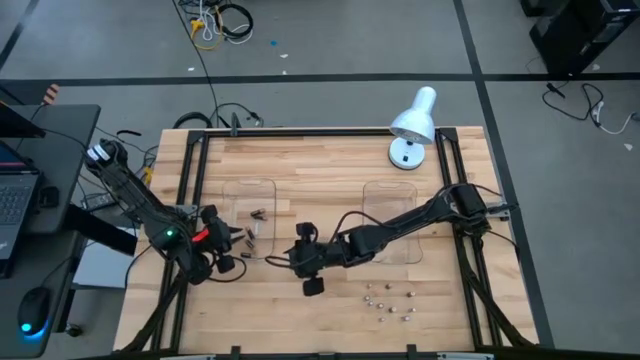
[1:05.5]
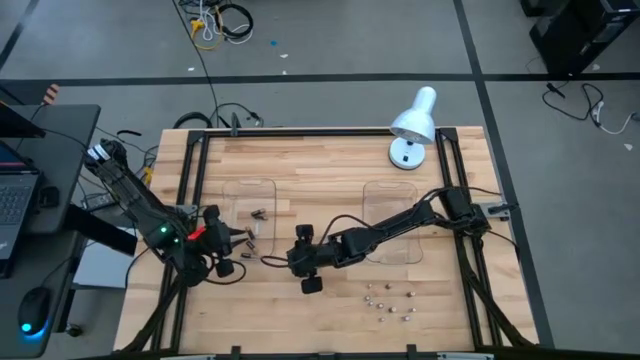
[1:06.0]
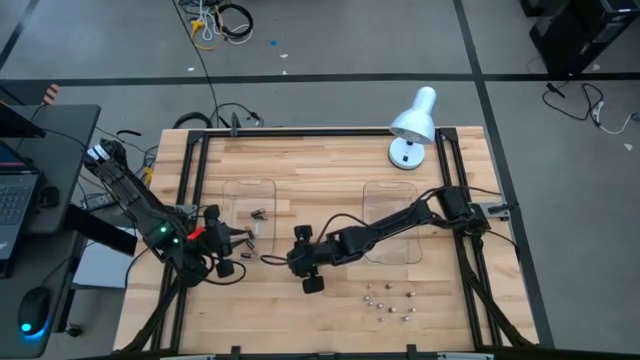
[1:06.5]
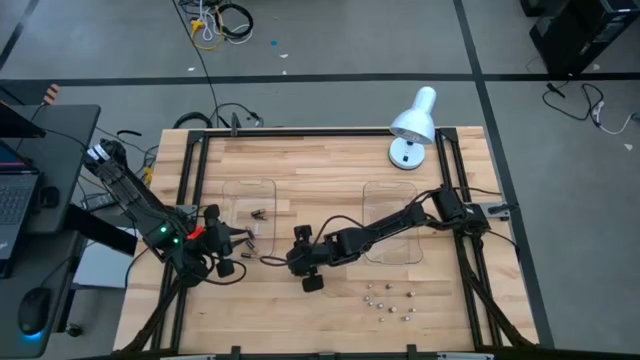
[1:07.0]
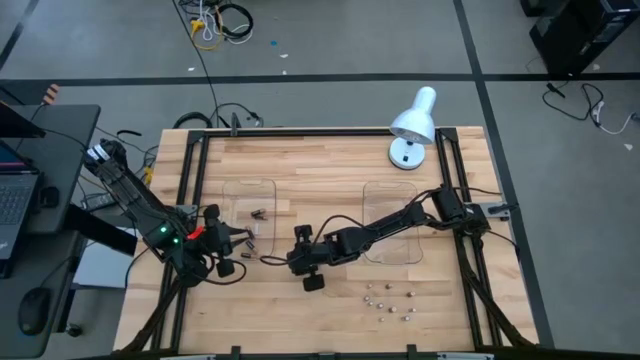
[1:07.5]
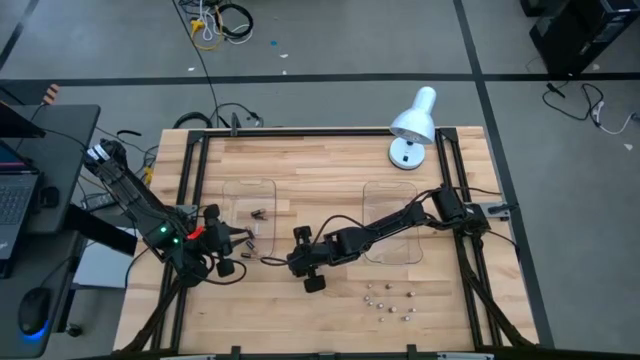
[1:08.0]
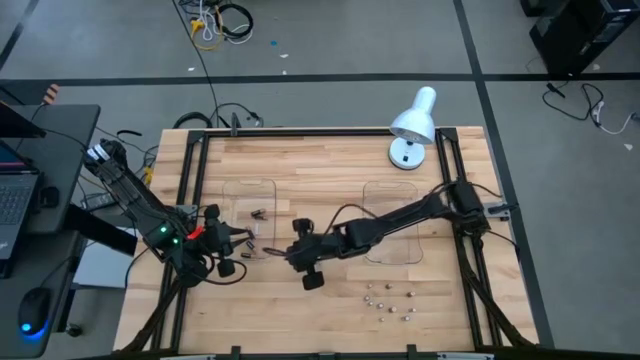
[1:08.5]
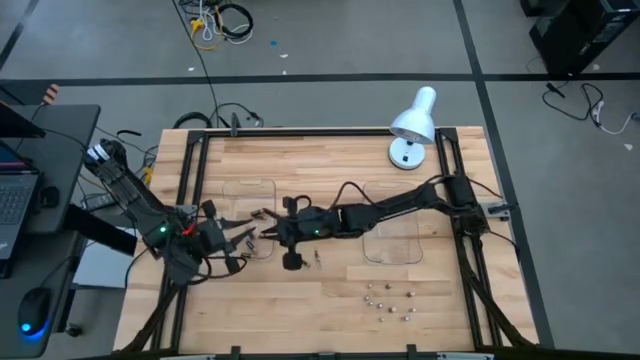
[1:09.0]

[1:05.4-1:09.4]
Task: Sort batteries
Put the black battery into the left transparent bin

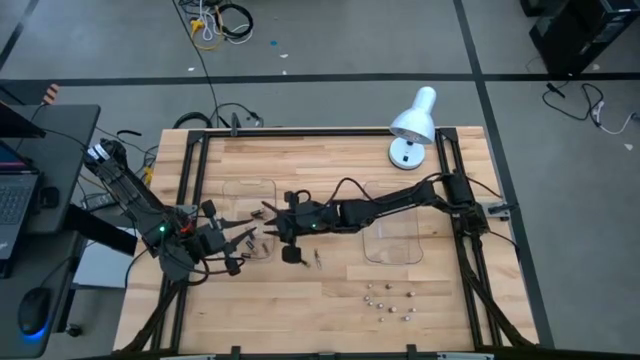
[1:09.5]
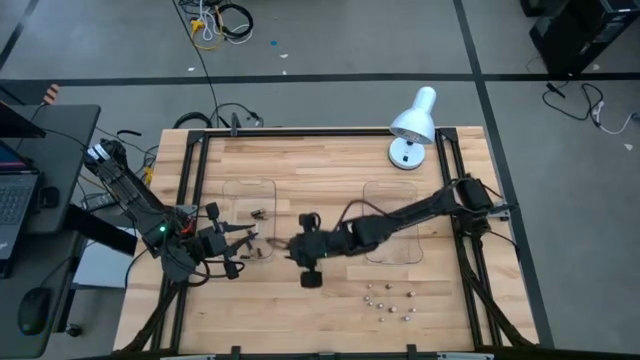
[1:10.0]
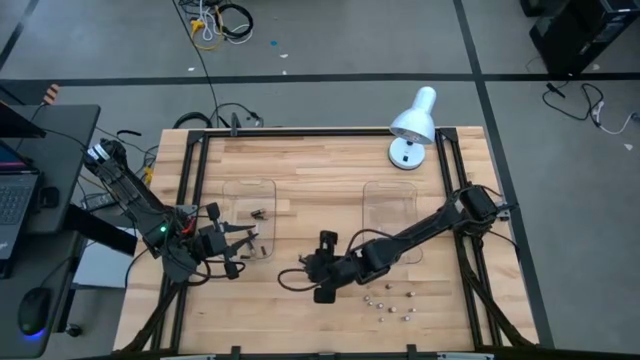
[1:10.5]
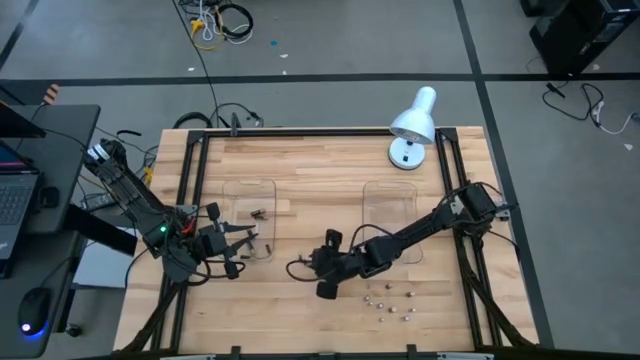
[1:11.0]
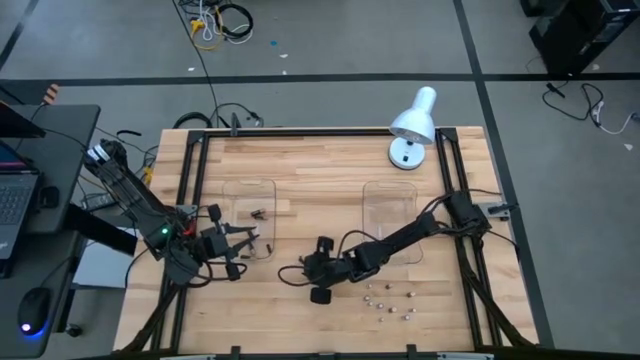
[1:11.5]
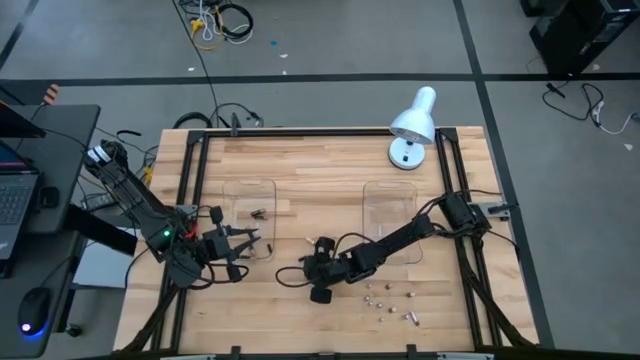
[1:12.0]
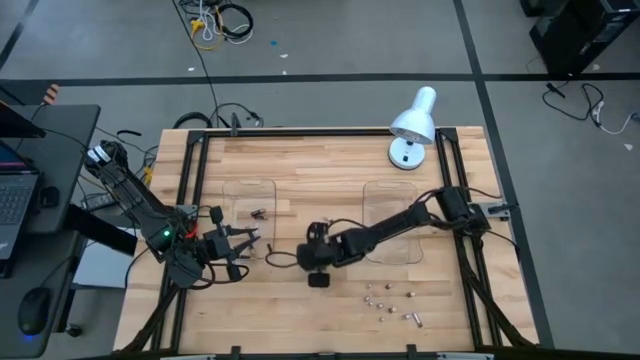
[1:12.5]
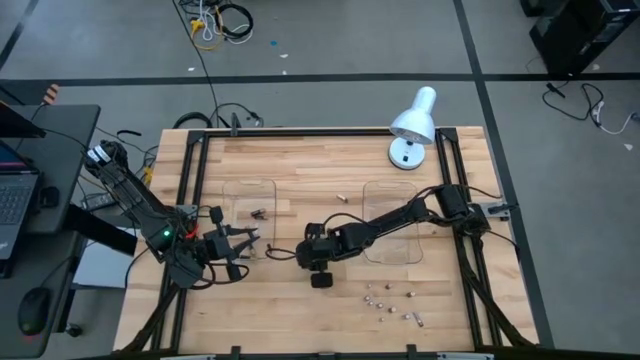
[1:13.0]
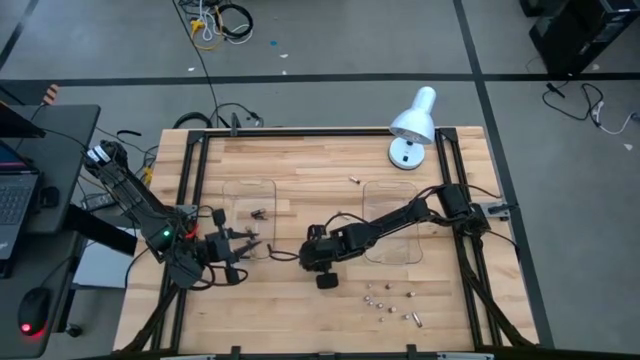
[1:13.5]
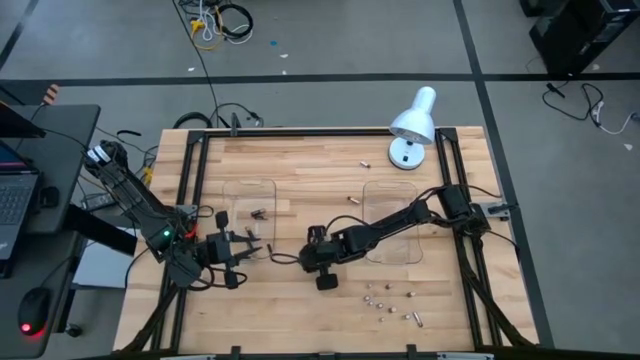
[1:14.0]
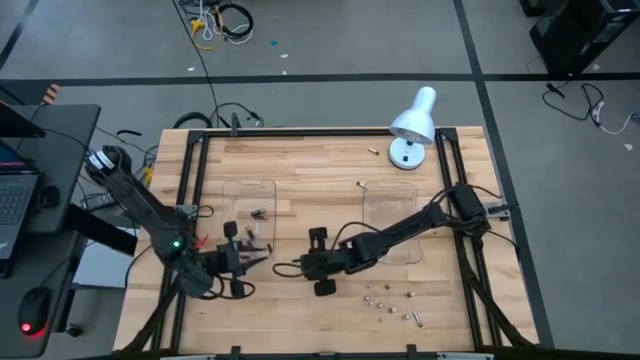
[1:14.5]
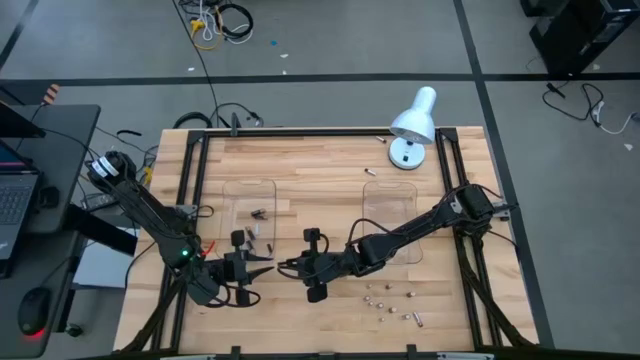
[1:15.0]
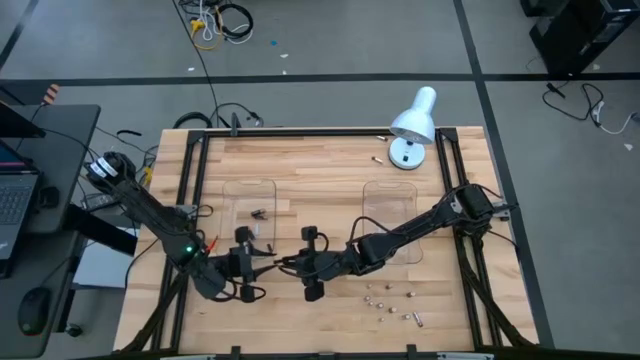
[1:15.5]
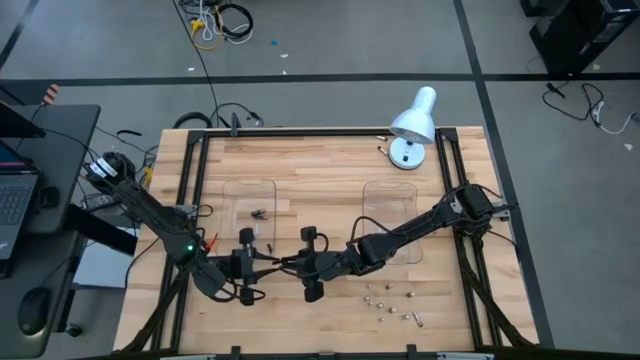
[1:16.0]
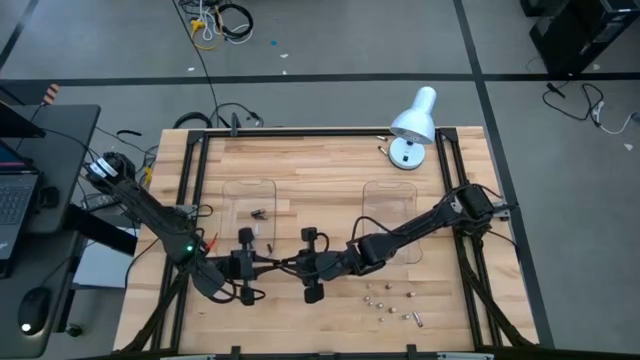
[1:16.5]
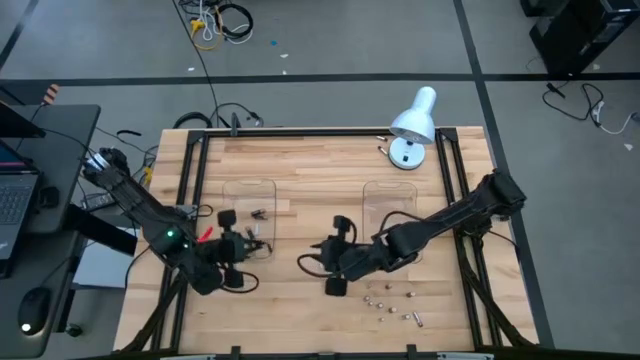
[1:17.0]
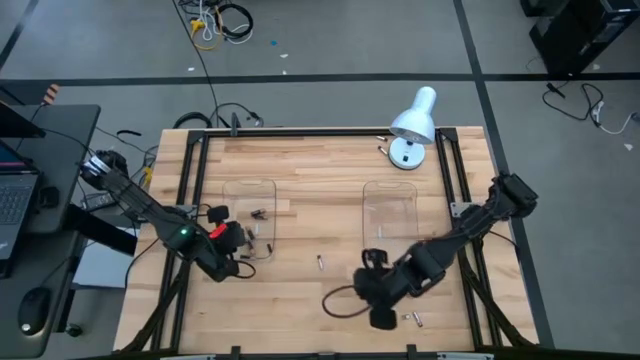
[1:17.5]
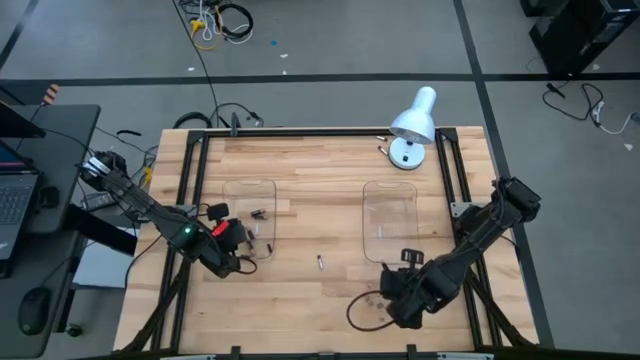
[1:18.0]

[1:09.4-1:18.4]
Put the black battery into the left transparent bin

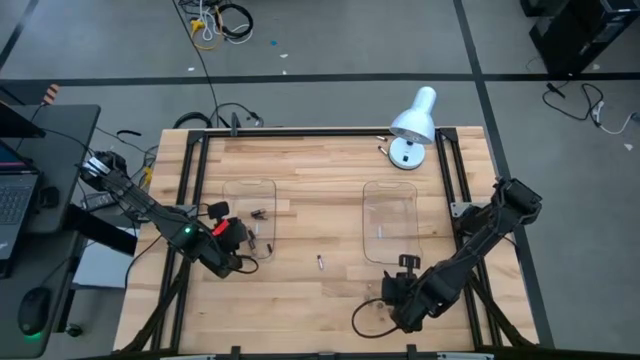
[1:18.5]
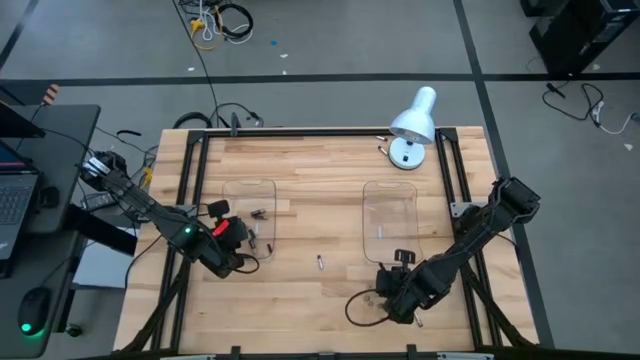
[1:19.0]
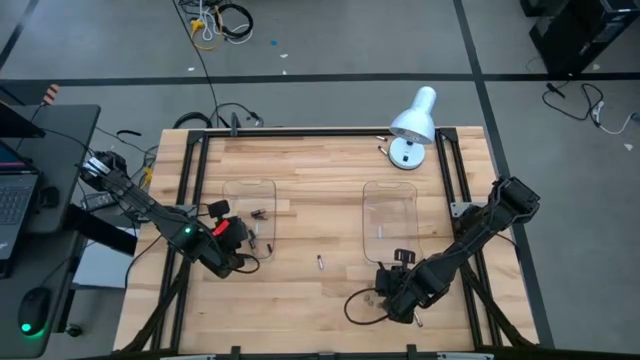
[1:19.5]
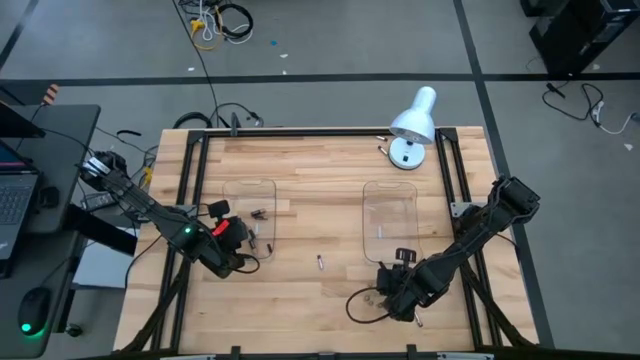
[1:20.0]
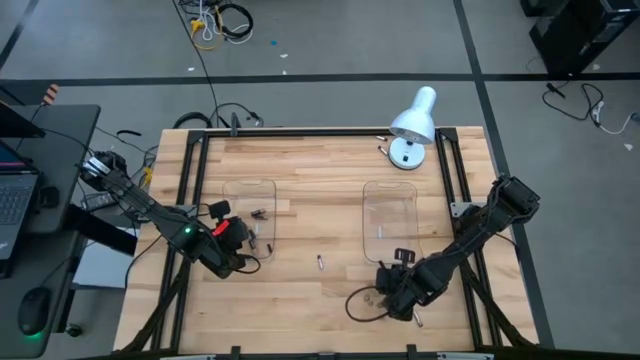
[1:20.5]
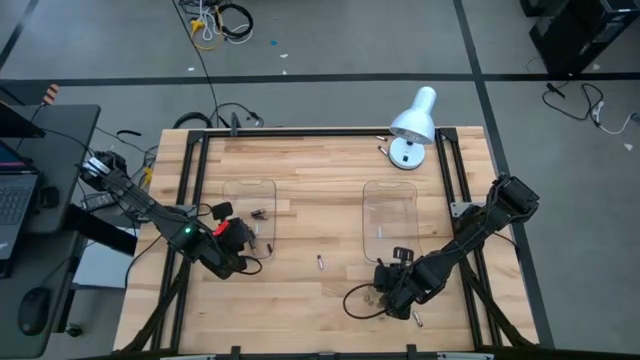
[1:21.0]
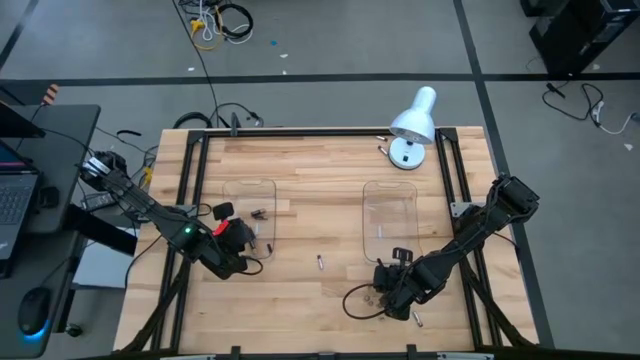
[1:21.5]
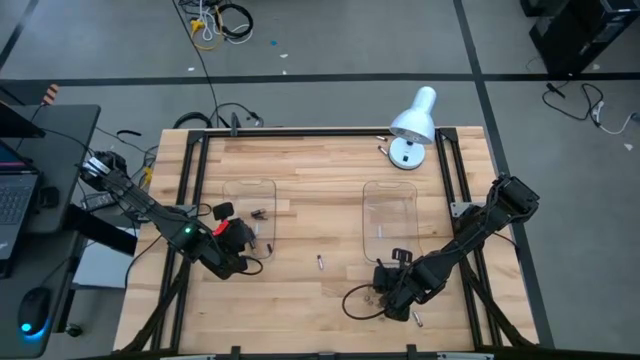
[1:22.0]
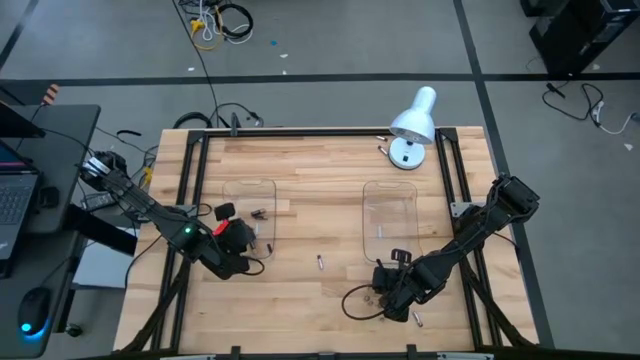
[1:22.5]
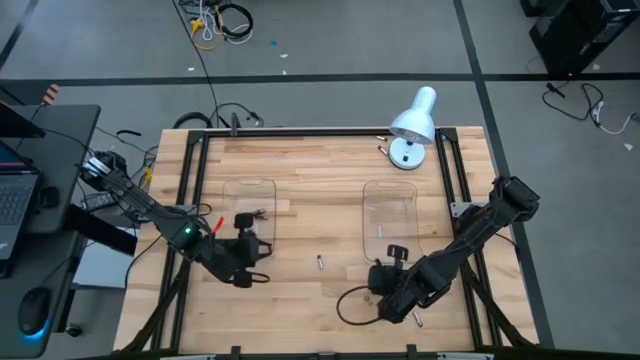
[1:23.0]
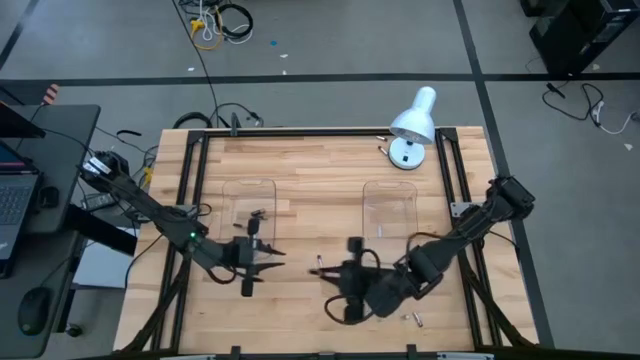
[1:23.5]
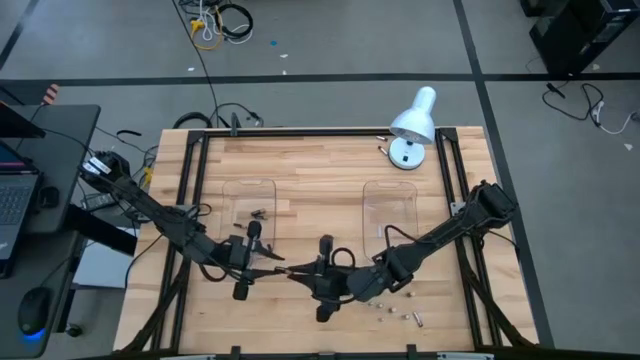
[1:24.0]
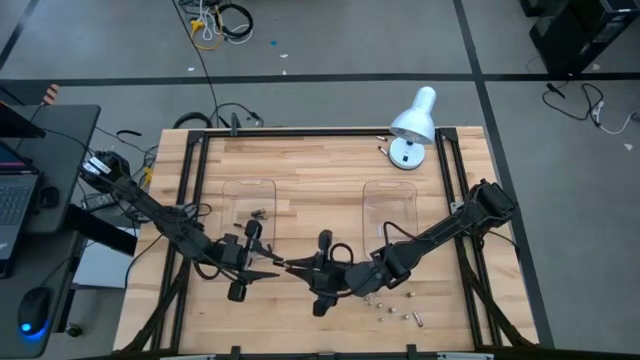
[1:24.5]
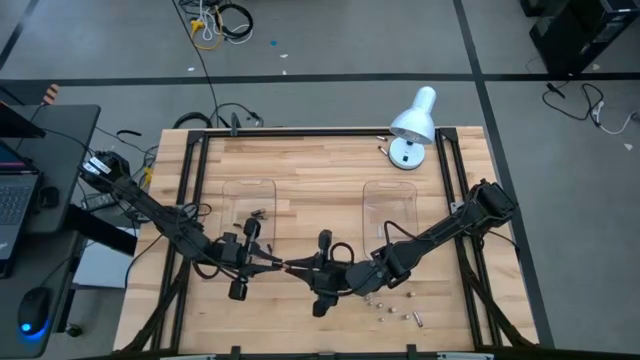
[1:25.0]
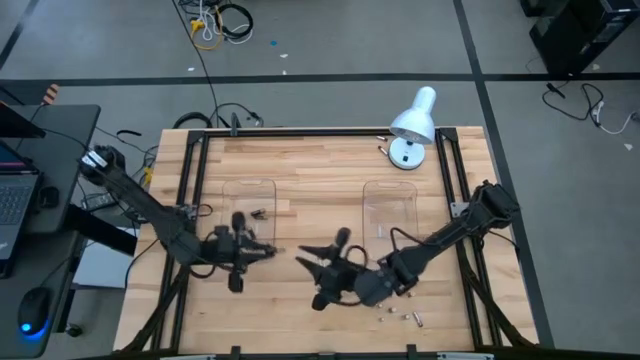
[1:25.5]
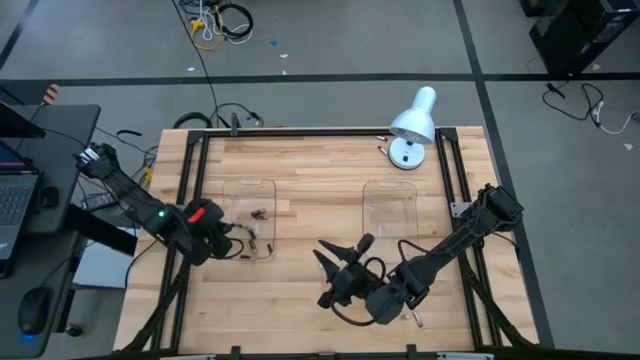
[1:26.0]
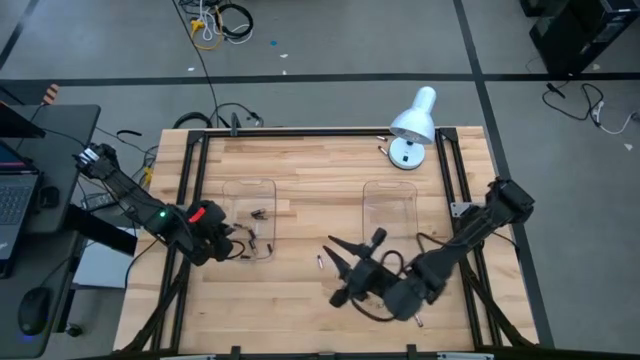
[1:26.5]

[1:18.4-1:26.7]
Put the black battery into the left transparent bin

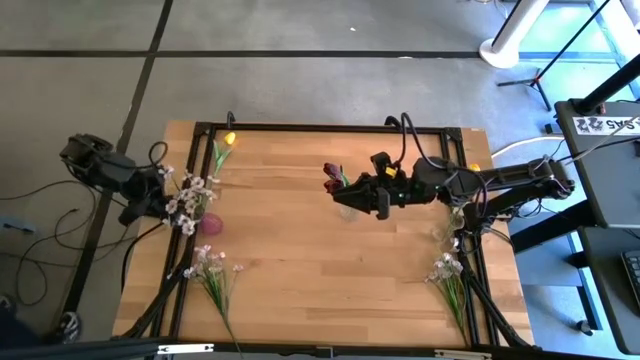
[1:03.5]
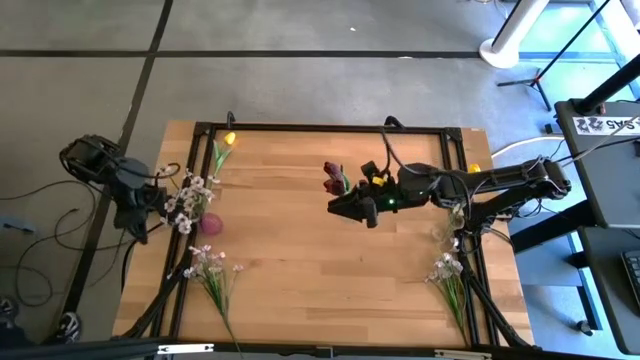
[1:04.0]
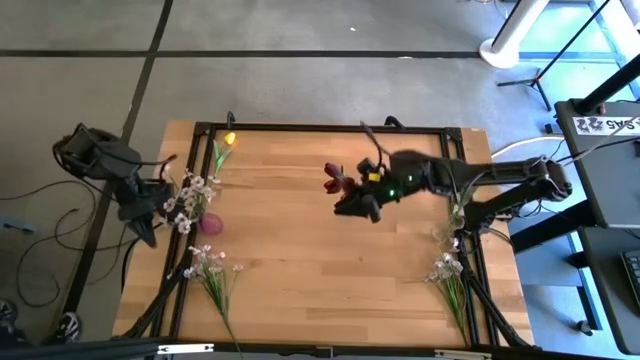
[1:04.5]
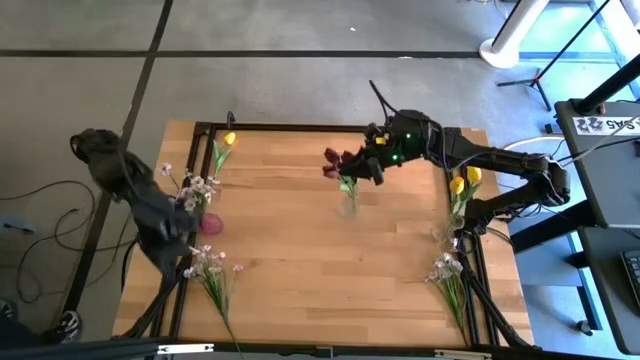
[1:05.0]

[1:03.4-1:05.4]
Task: Sort flowers into vase by color
Adjust the red tulips in the top transparent vase
